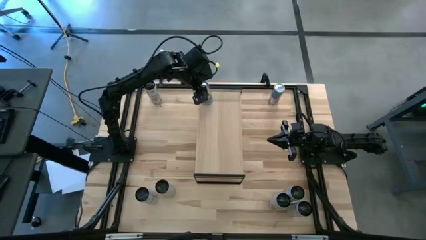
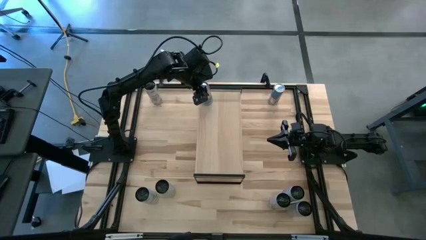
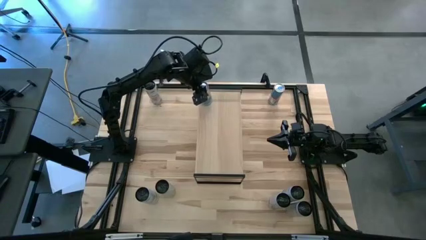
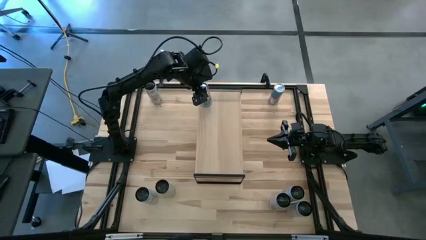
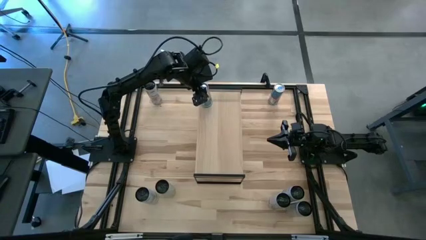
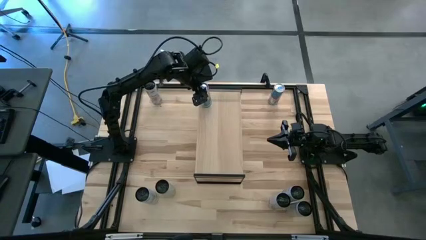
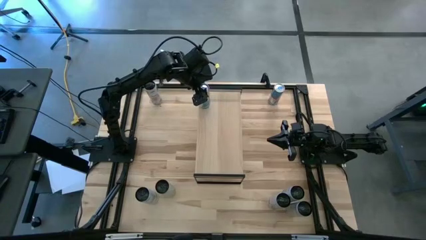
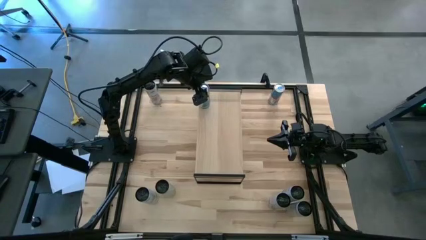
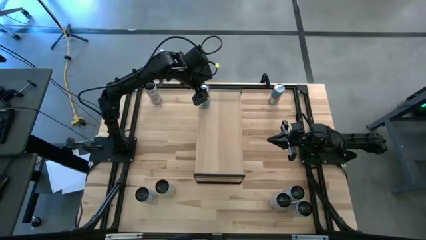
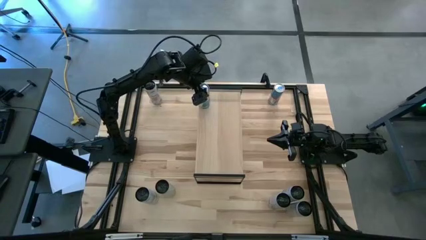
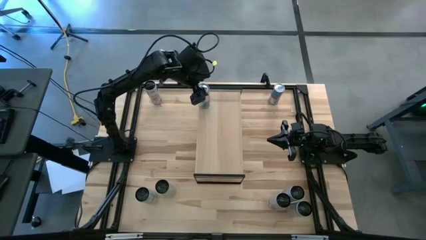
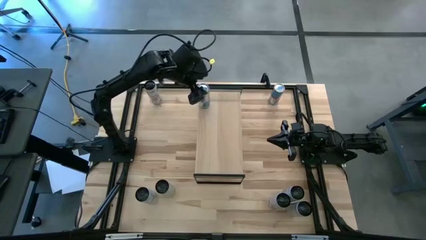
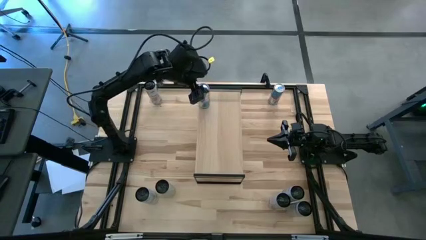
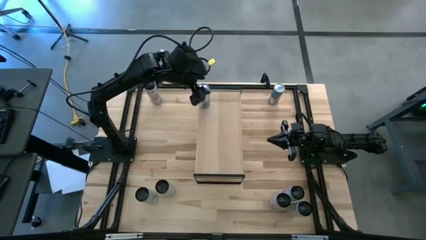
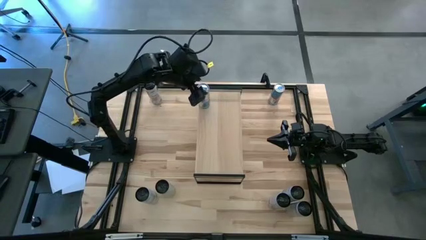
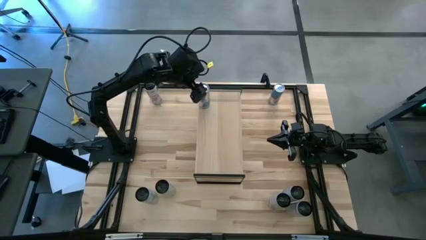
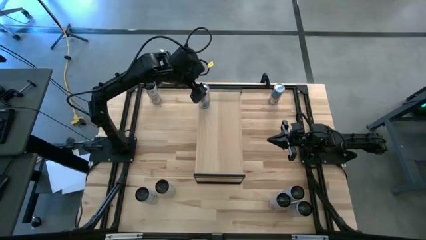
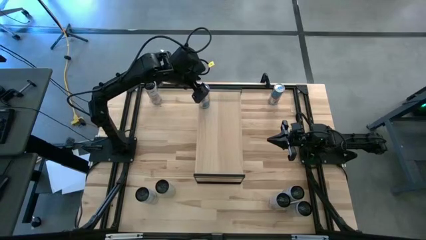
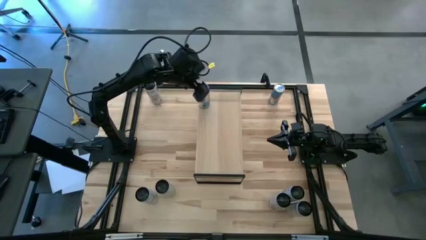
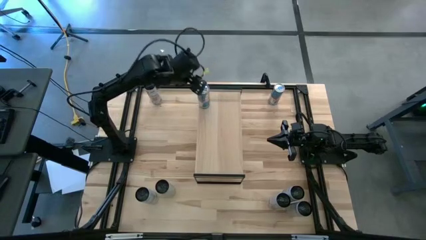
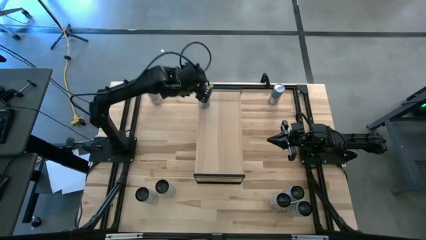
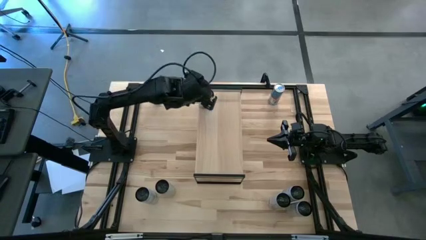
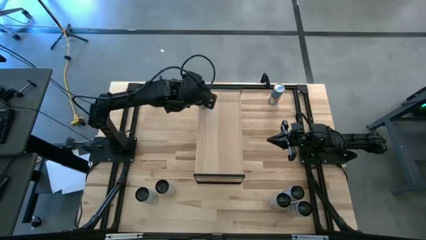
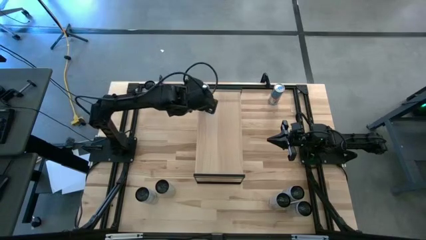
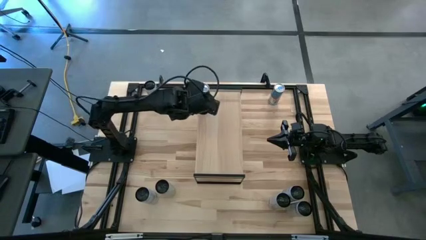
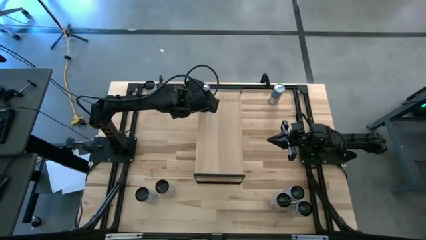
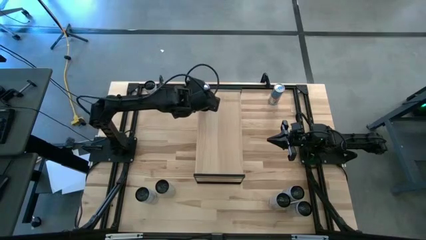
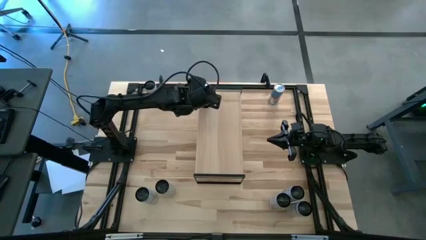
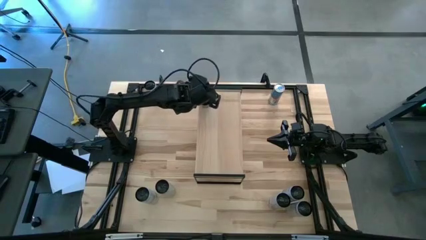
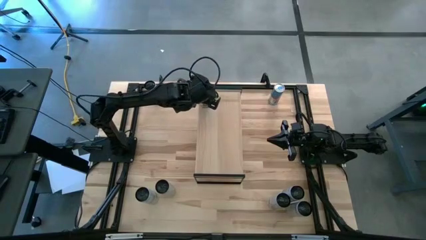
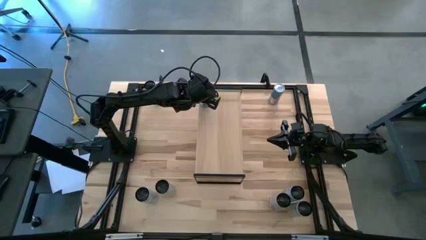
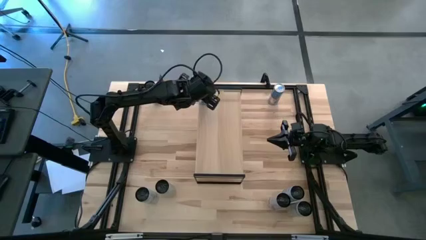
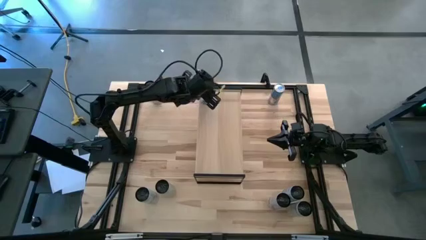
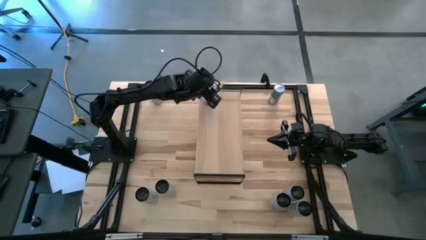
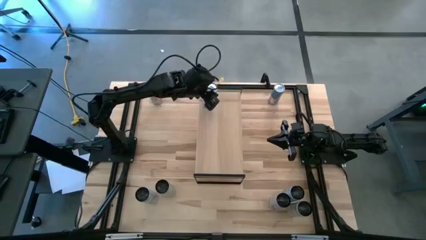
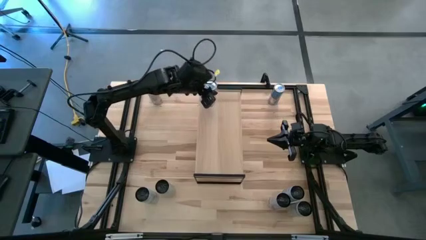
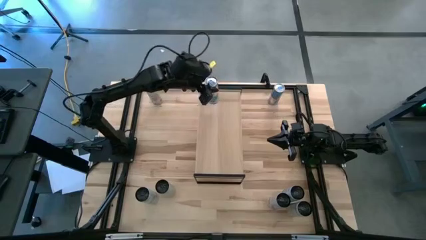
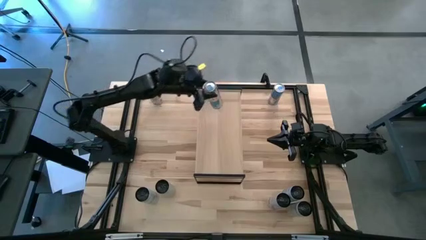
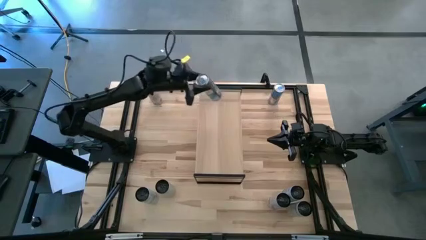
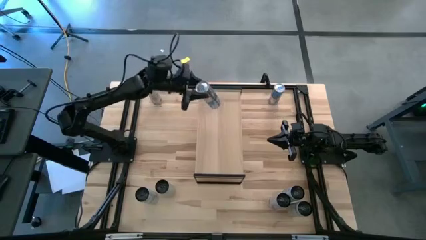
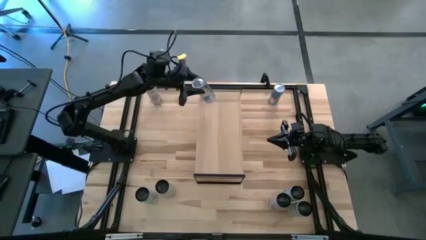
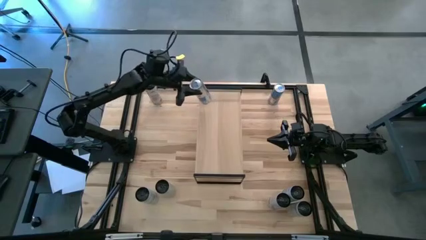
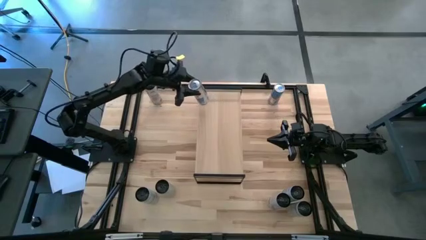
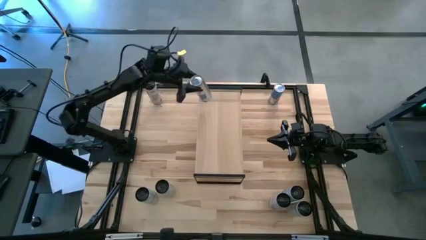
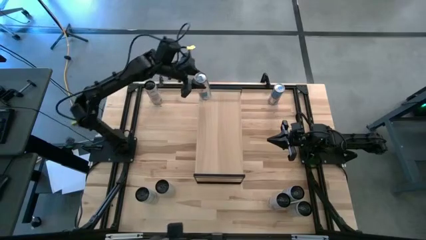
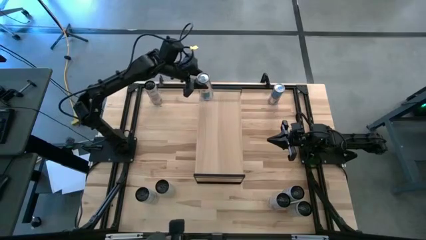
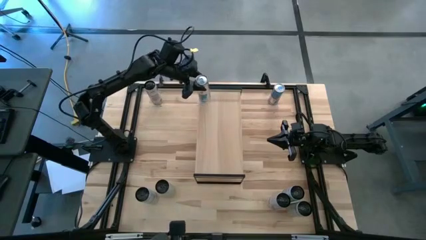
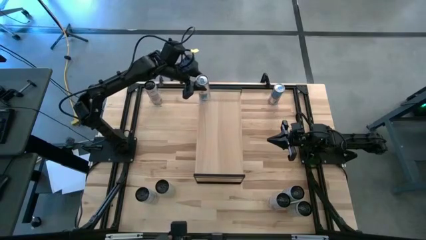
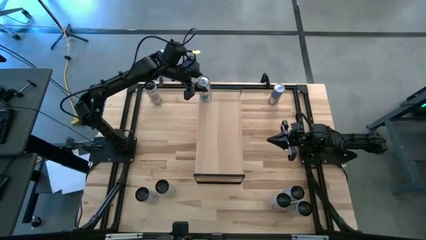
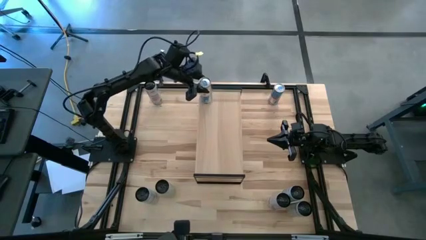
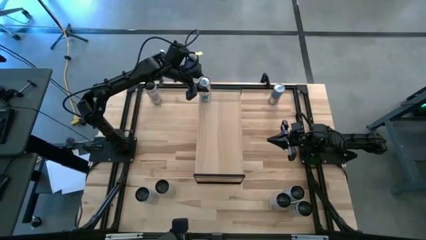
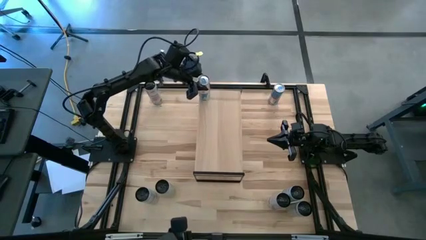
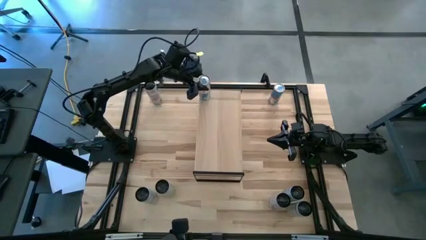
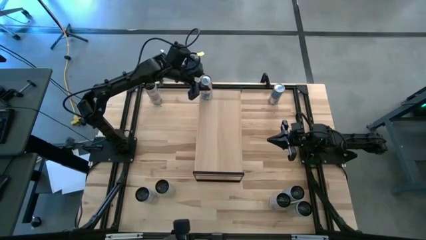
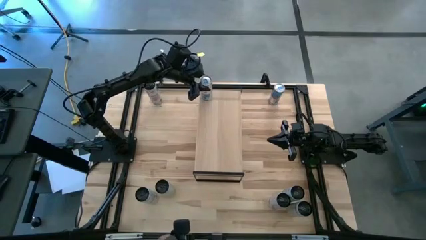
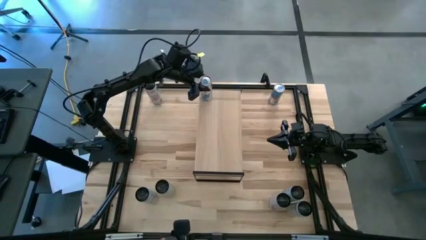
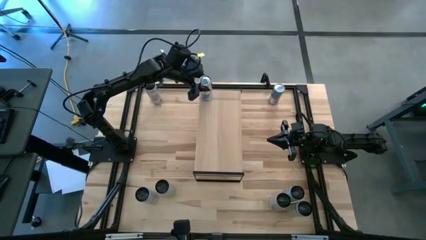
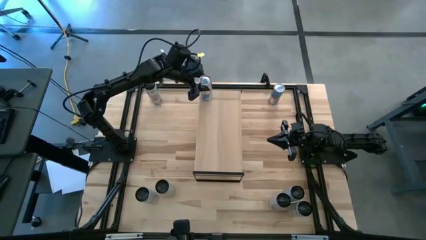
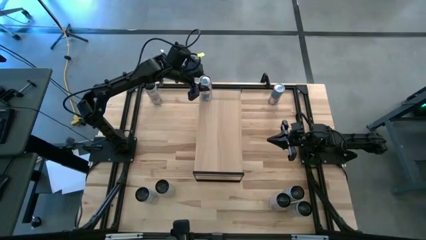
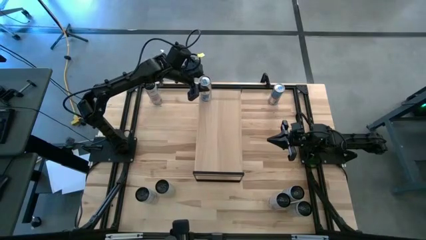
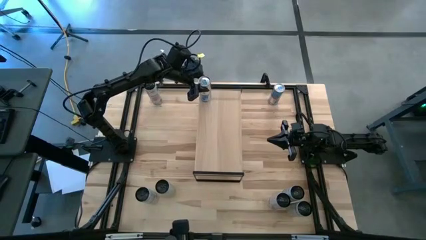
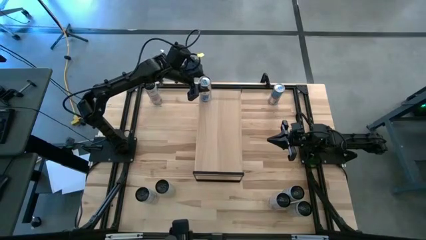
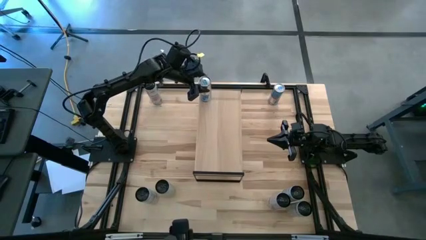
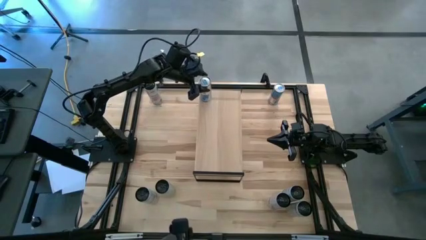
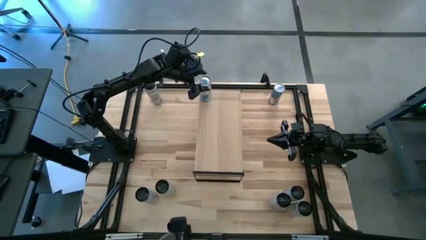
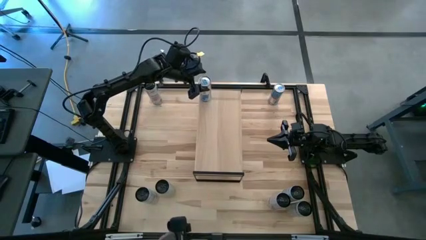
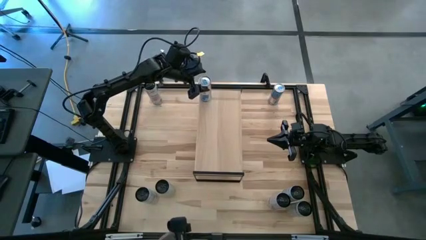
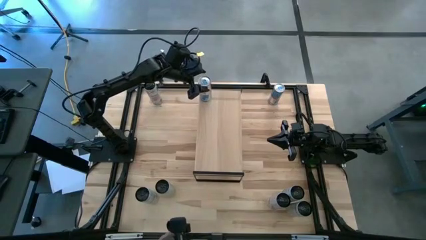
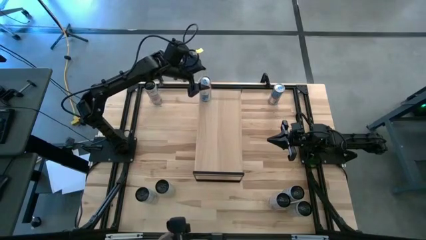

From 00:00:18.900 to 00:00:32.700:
Task: Place canned beverage on shelf
Put the top left blue soda can on the shelf
